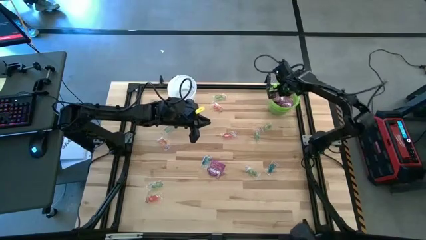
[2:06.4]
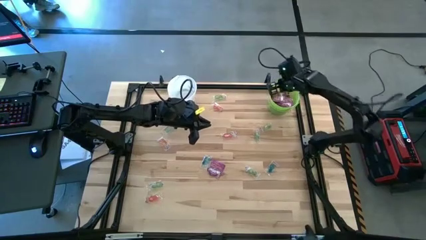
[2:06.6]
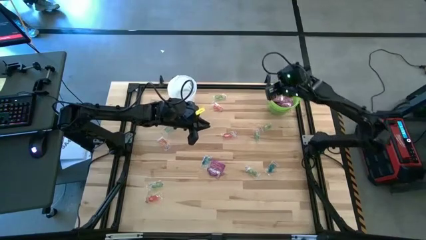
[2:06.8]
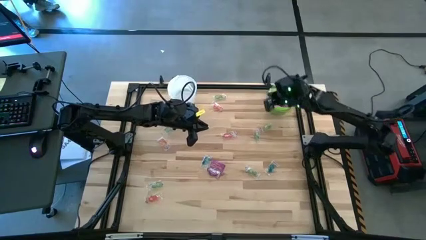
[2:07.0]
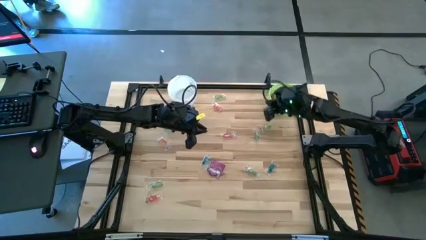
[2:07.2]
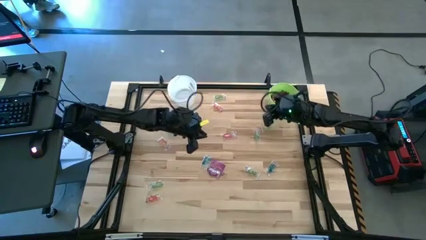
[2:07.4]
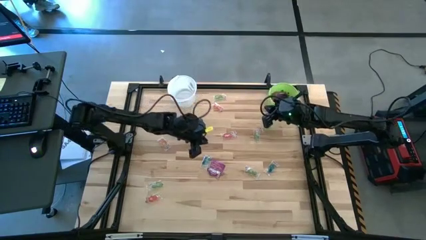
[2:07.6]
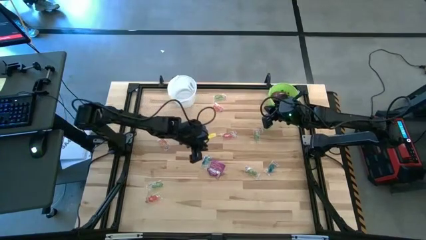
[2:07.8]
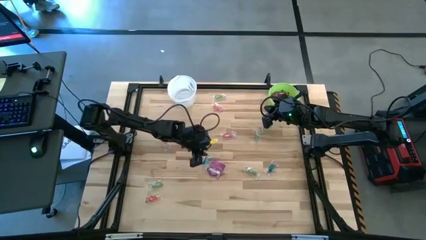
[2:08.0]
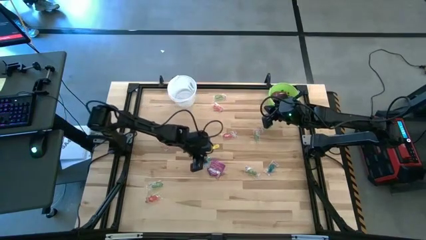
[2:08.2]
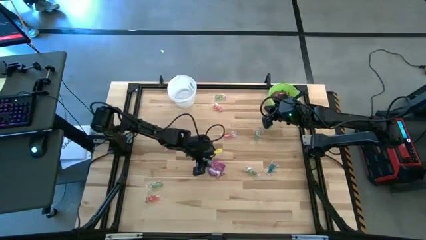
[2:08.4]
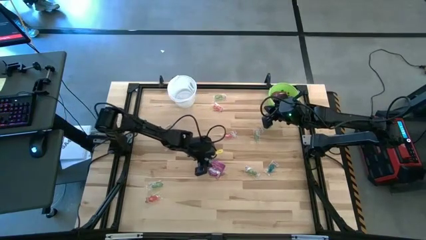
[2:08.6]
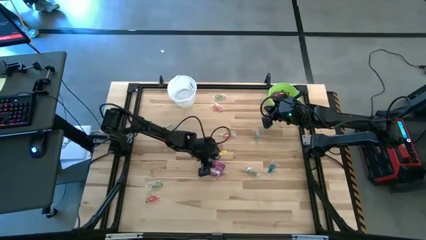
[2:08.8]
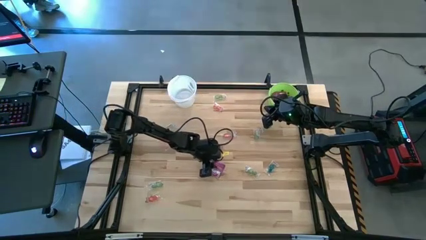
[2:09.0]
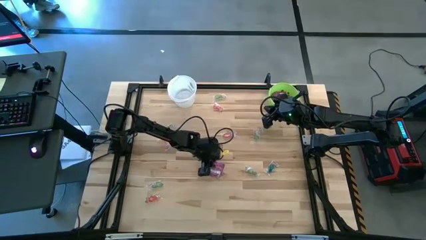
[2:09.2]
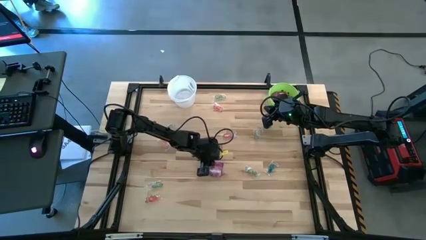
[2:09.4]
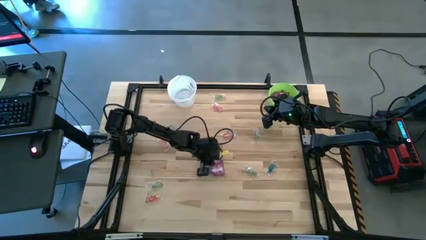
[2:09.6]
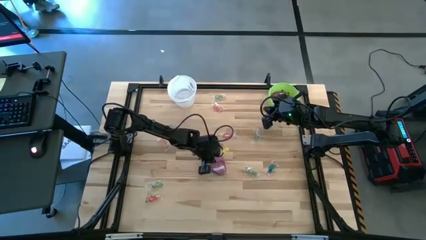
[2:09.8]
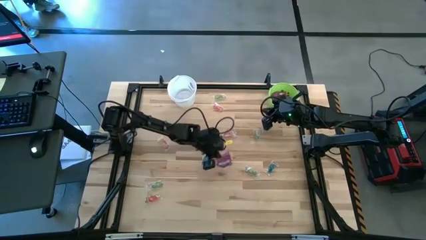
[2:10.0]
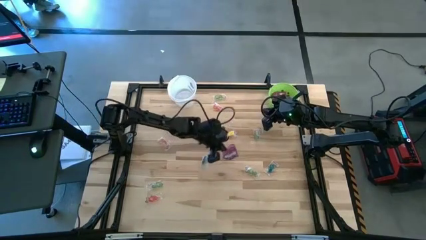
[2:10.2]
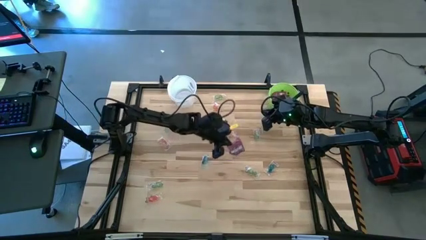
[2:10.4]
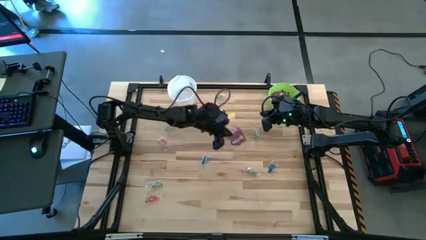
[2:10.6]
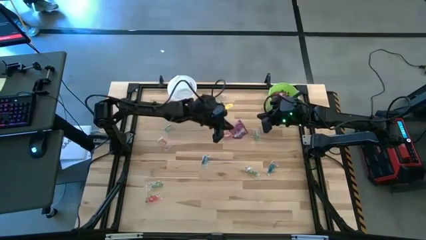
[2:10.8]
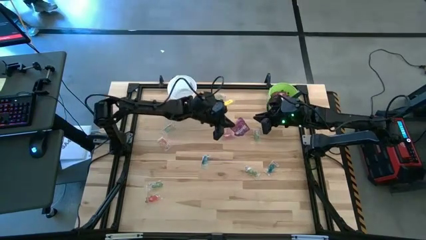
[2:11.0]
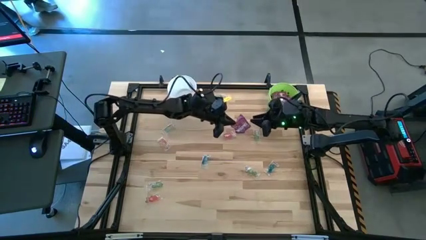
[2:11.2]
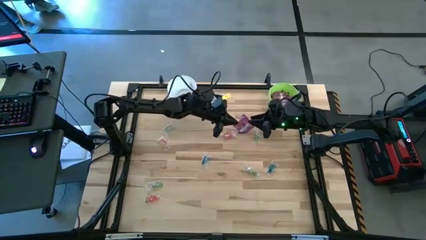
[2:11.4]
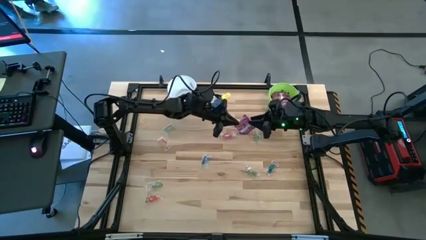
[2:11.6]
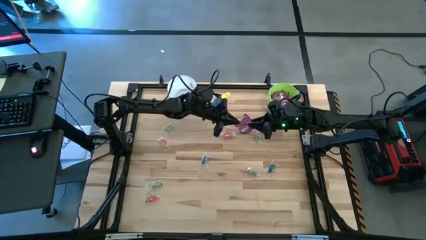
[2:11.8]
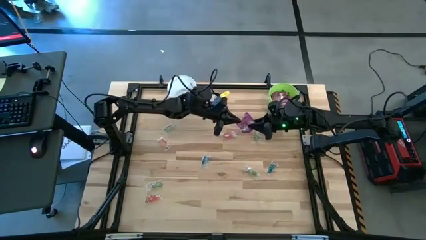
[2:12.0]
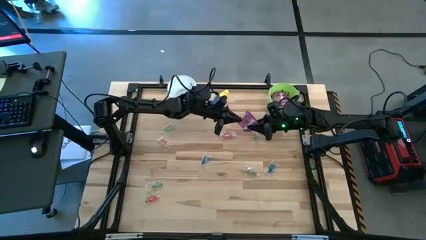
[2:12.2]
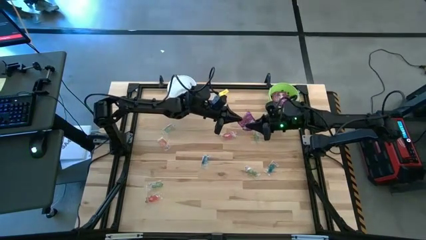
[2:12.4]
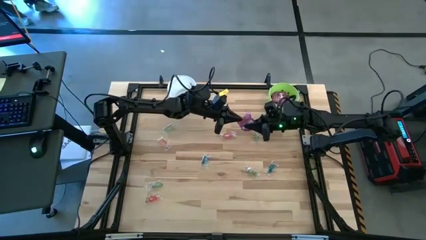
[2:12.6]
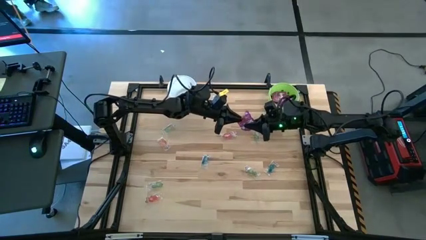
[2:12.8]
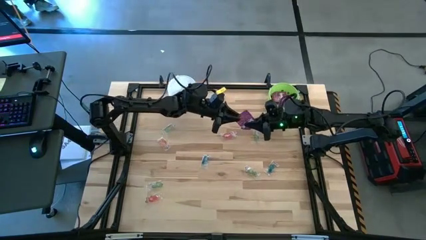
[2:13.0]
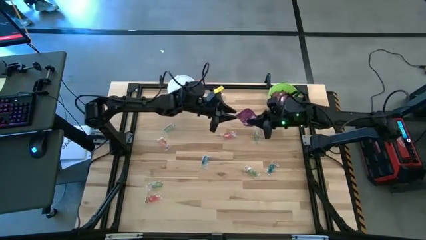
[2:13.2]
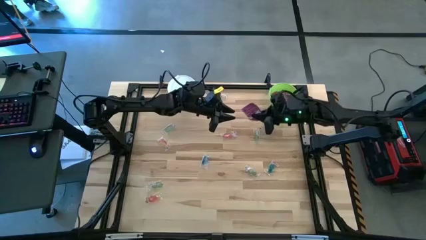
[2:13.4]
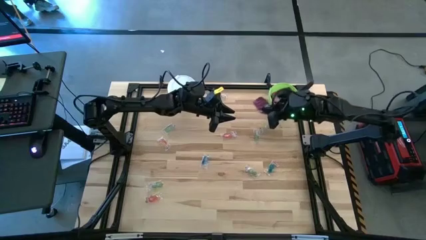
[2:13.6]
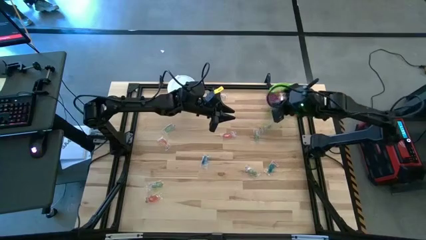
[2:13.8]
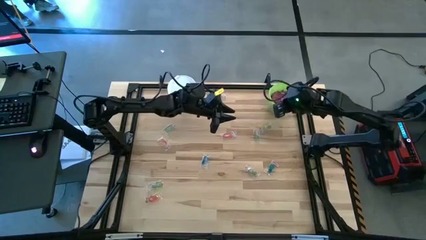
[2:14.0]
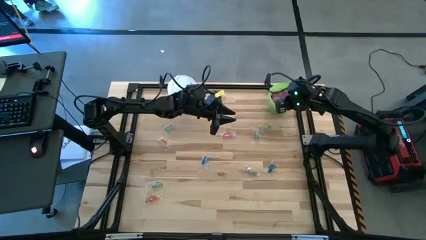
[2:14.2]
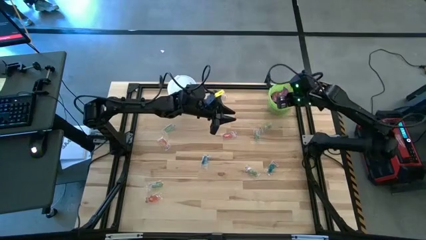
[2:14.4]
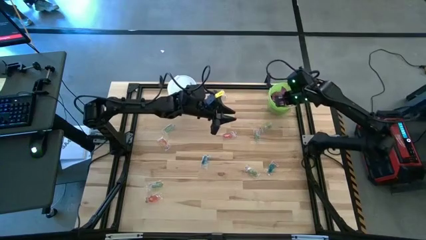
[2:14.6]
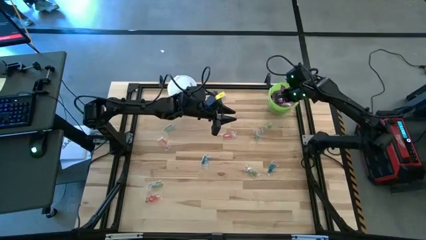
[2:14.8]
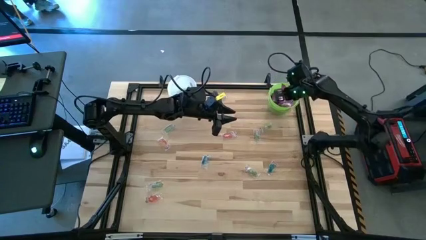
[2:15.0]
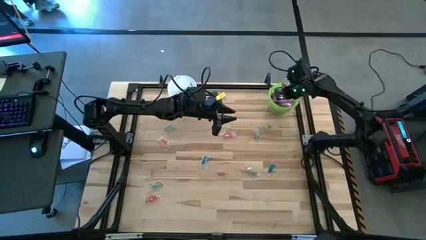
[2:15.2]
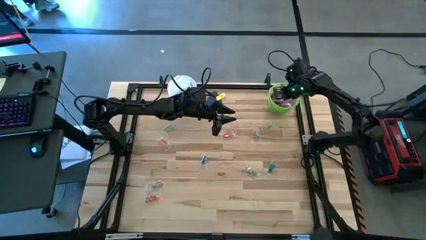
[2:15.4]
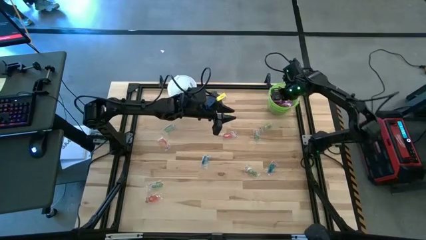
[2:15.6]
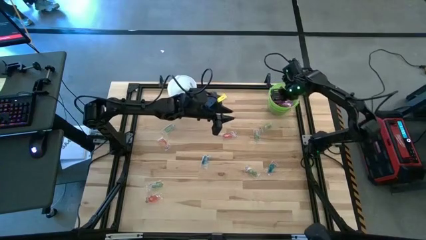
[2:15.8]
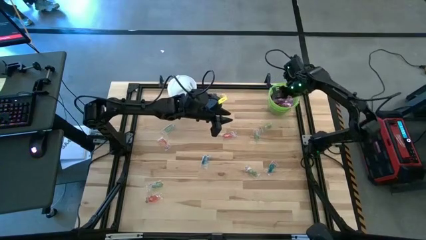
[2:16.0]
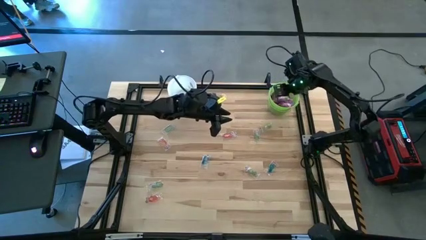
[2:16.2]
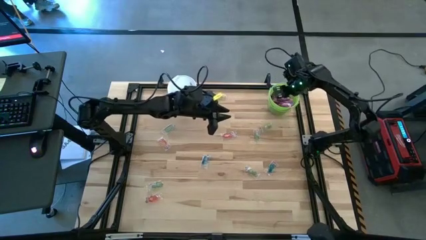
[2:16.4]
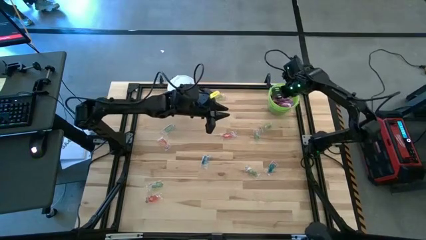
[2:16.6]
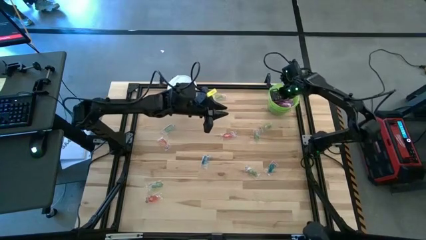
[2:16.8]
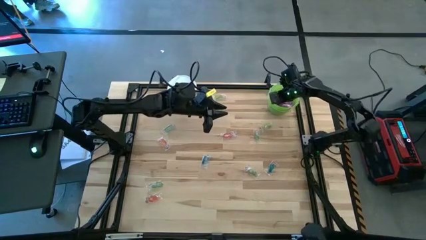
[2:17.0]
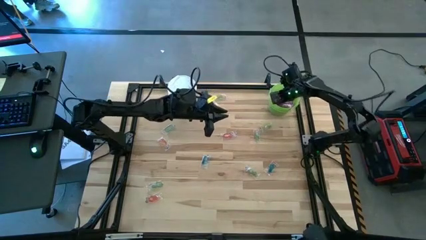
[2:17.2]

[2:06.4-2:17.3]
Task: Sort candy by brand, put in halloween buckets
Put the violet candy into the green bucket

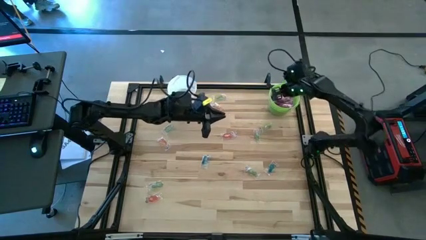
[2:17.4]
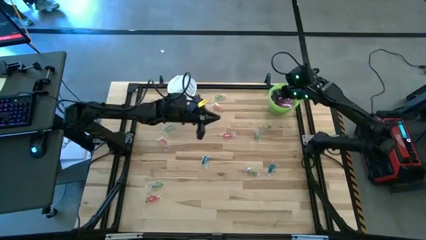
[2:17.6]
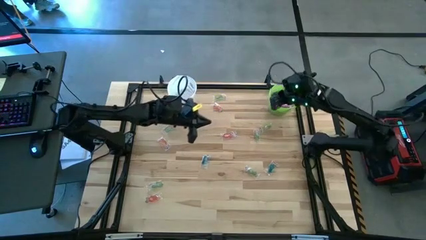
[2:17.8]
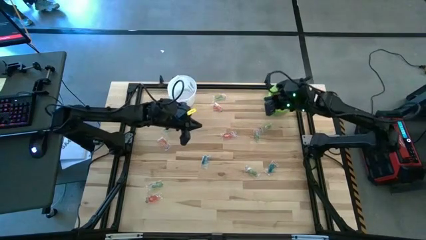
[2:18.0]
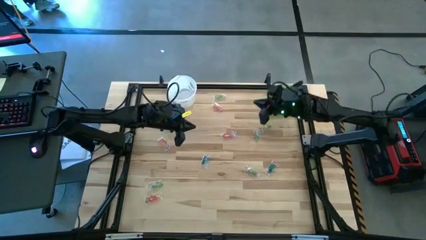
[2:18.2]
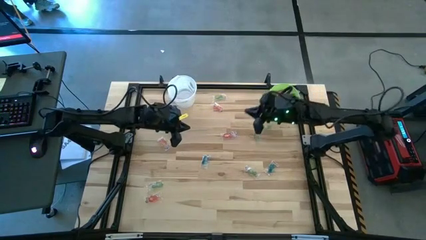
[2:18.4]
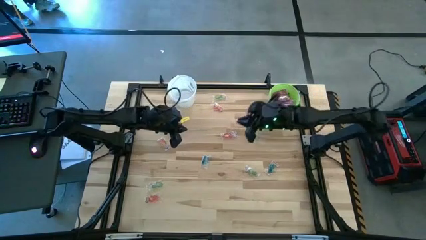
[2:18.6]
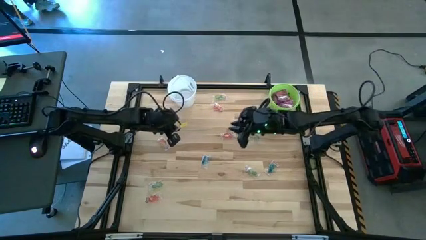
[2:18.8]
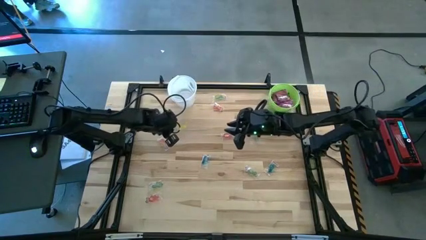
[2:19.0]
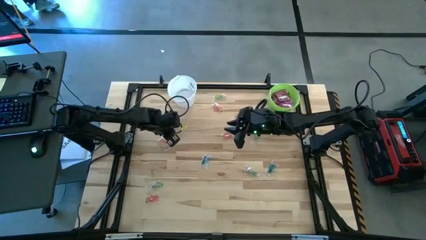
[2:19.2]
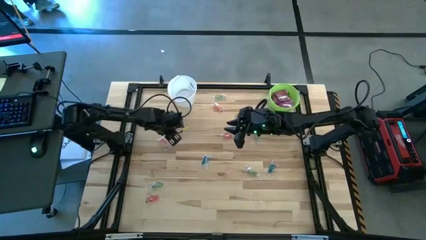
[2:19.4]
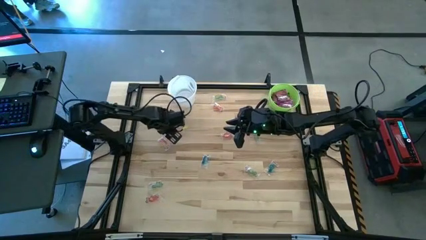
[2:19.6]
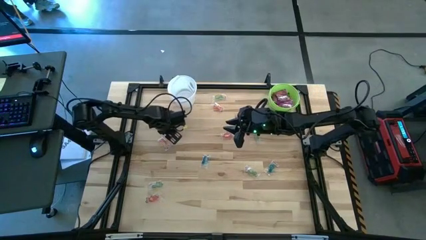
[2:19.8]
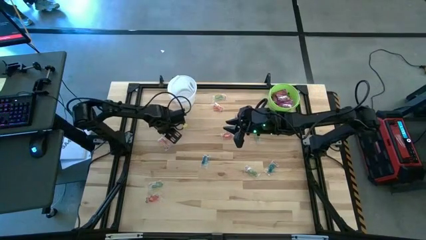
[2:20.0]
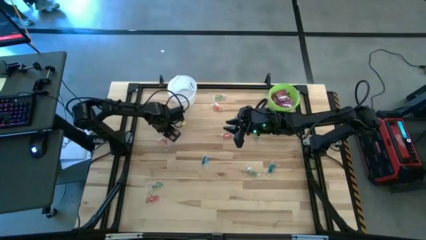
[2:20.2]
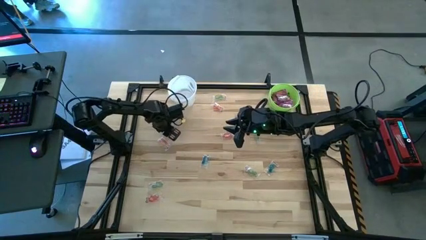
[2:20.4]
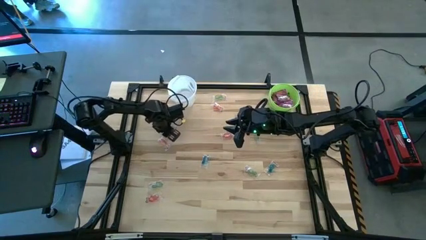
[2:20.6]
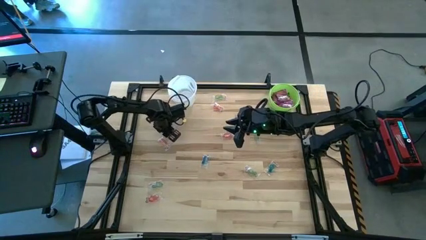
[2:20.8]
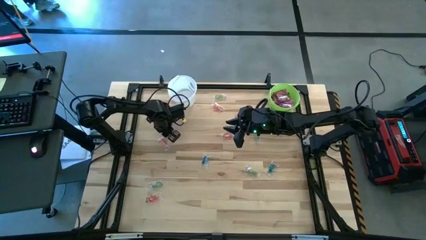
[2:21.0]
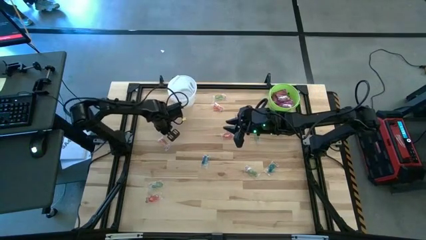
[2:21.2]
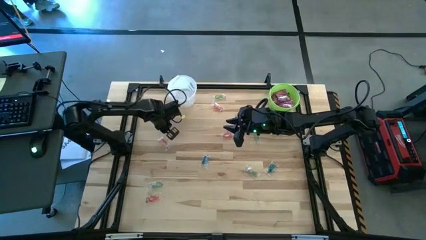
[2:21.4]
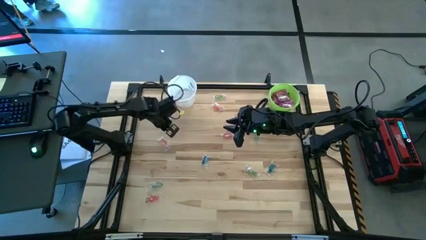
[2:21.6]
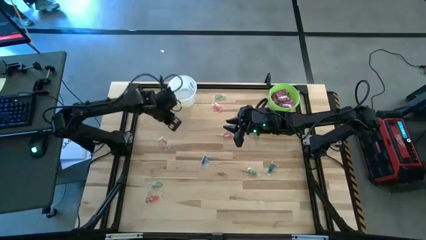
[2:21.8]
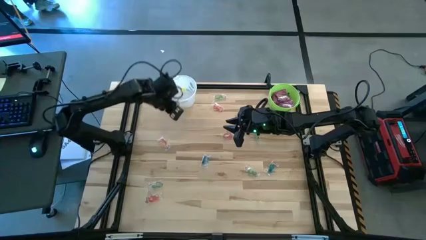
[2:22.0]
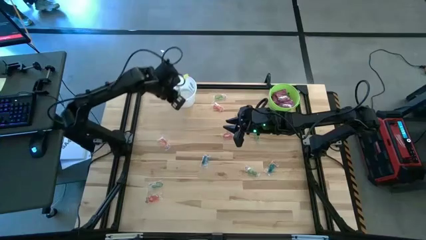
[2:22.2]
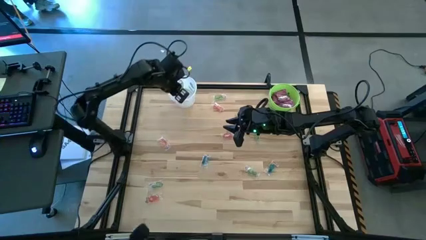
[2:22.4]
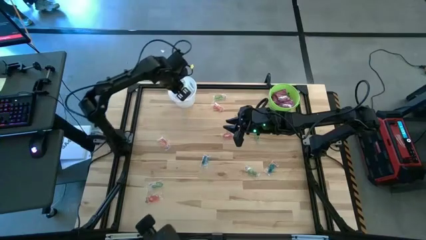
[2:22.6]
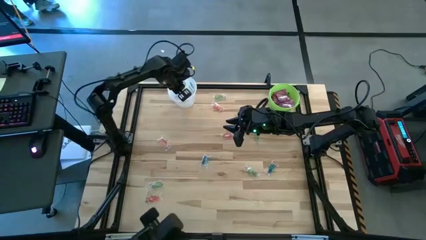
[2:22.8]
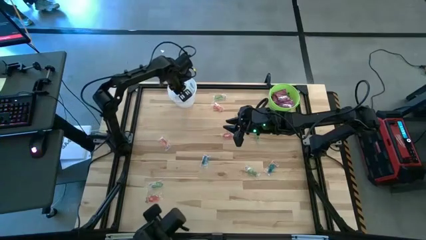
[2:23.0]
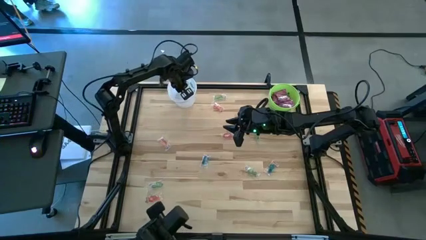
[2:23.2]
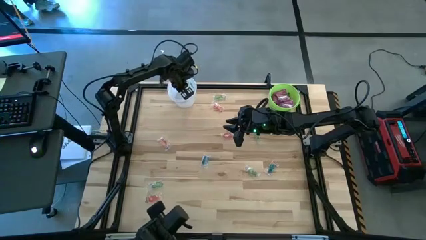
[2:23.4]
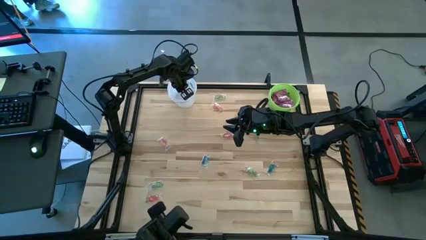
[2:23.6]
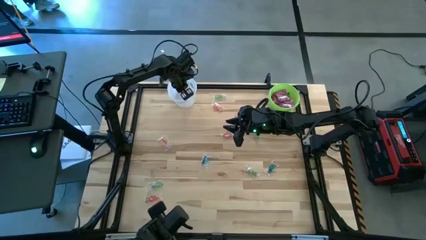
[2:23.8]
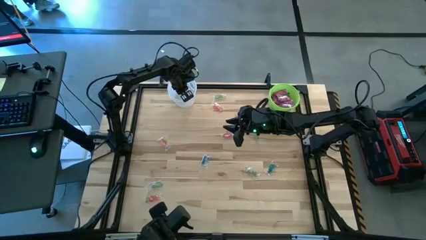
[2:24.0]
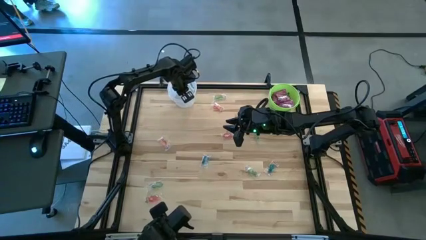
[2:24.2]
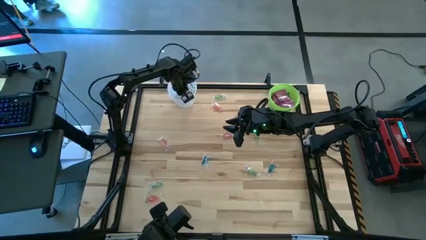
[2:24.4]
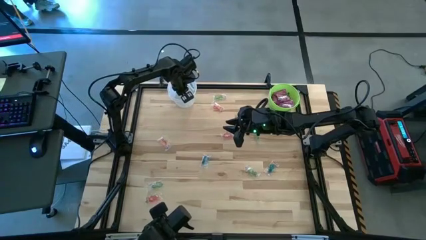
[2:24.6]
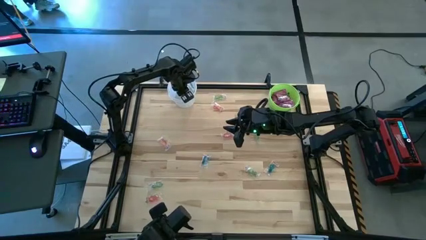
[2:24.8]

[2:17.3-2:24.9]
Put the green gummy into the white bucket
